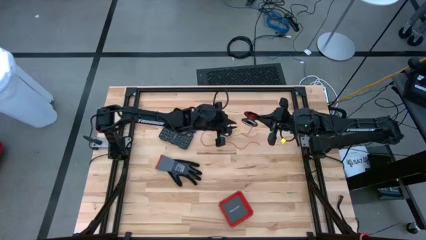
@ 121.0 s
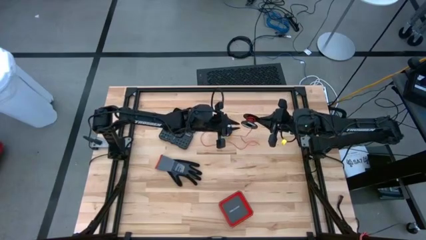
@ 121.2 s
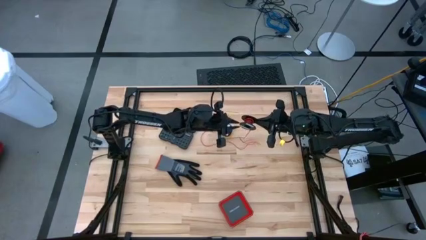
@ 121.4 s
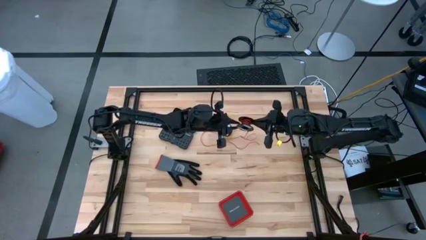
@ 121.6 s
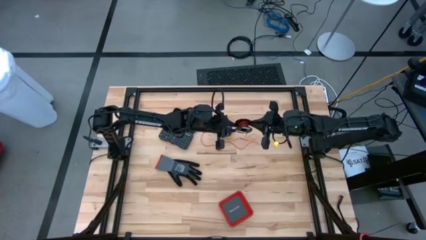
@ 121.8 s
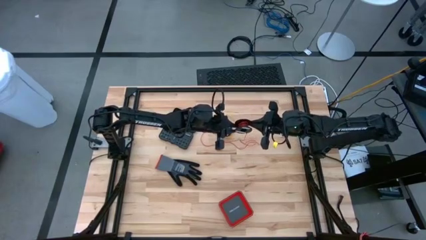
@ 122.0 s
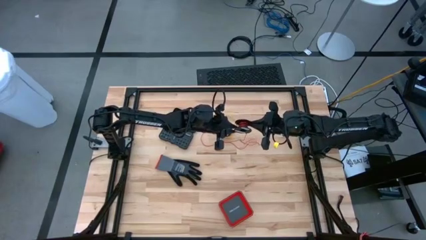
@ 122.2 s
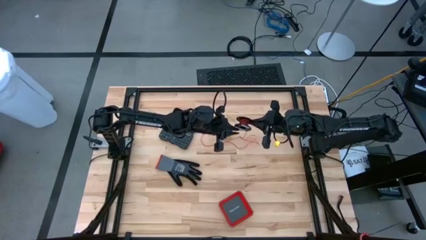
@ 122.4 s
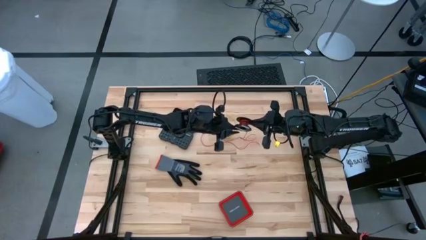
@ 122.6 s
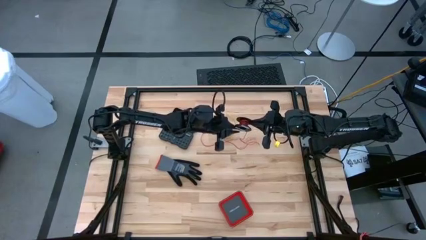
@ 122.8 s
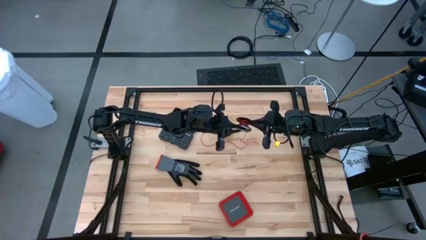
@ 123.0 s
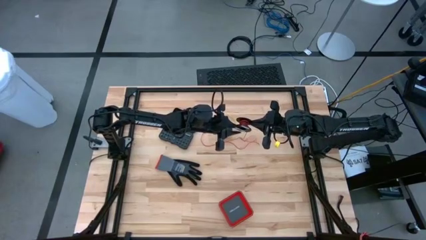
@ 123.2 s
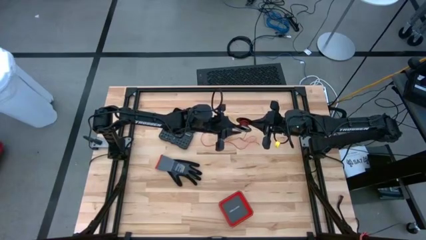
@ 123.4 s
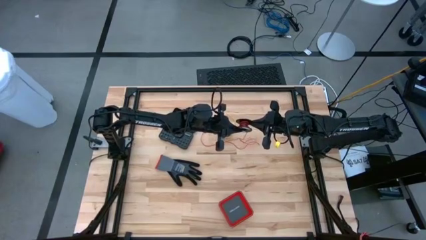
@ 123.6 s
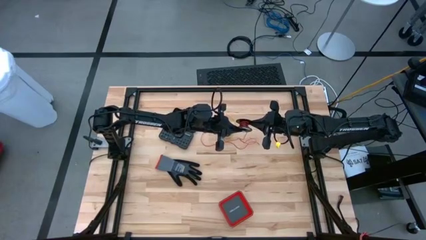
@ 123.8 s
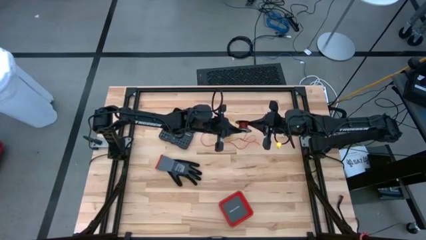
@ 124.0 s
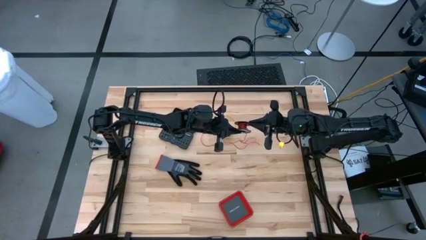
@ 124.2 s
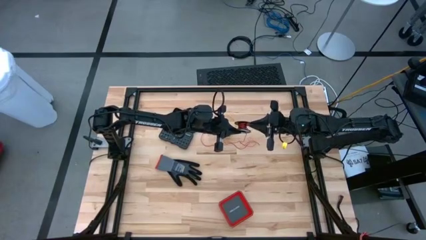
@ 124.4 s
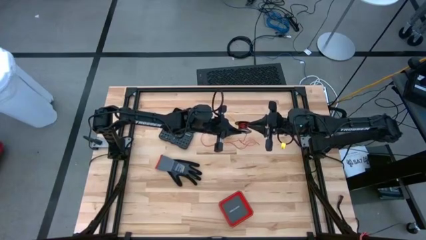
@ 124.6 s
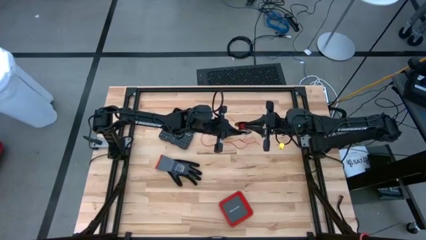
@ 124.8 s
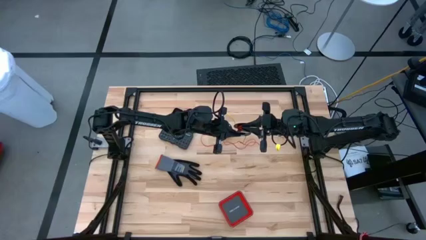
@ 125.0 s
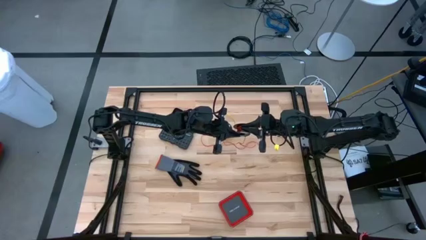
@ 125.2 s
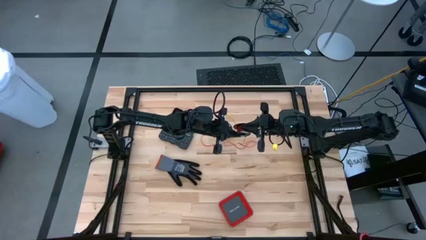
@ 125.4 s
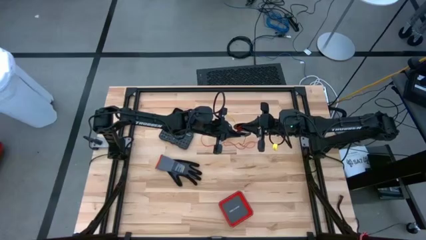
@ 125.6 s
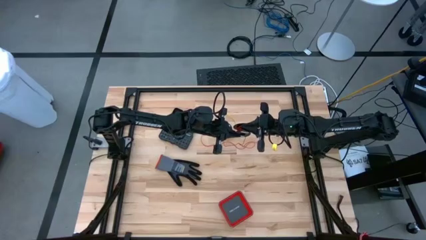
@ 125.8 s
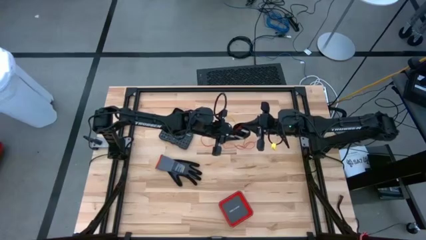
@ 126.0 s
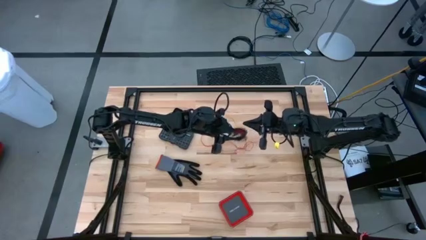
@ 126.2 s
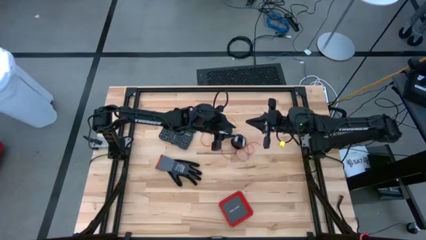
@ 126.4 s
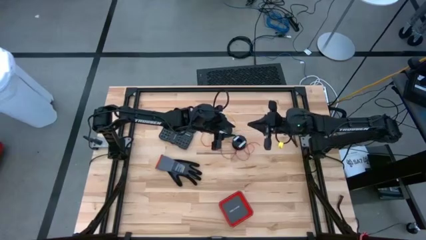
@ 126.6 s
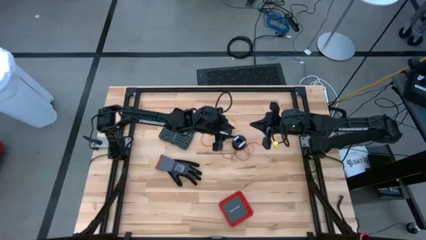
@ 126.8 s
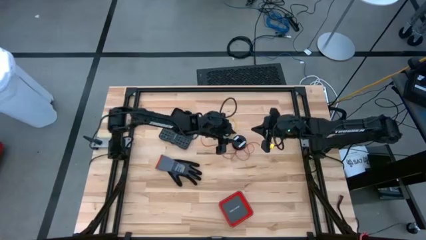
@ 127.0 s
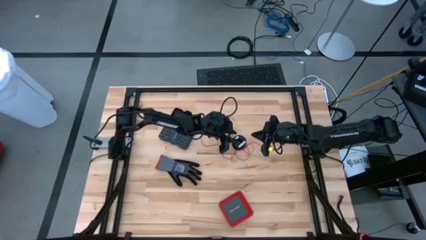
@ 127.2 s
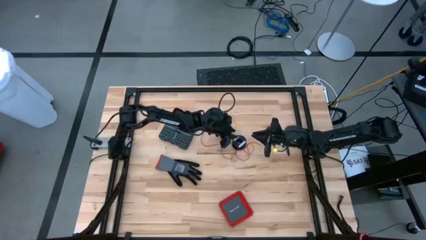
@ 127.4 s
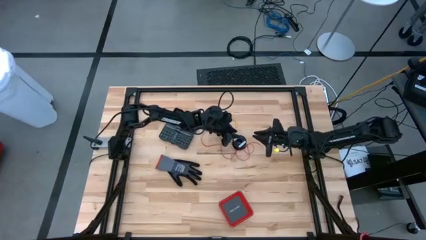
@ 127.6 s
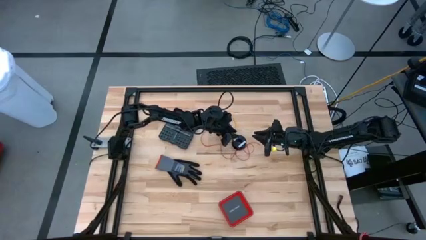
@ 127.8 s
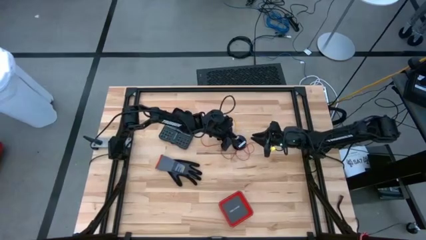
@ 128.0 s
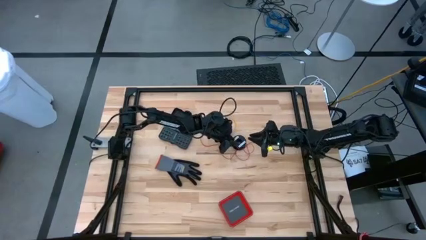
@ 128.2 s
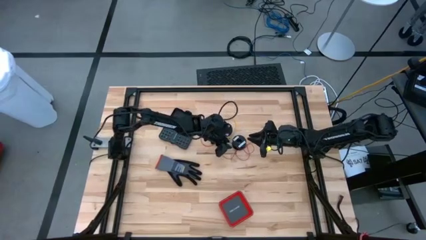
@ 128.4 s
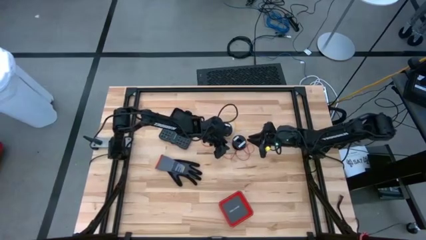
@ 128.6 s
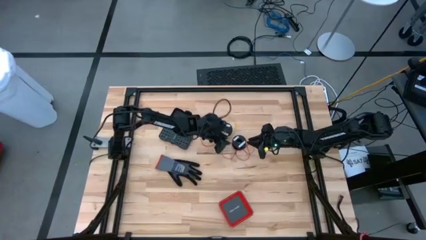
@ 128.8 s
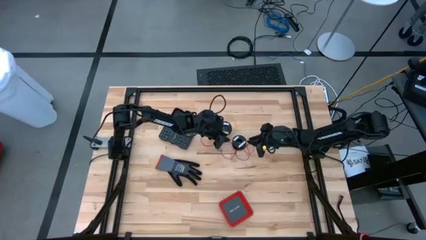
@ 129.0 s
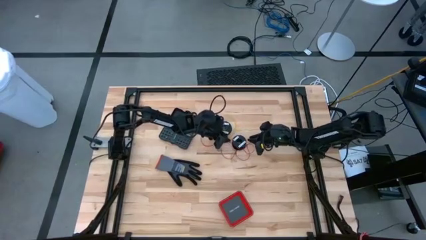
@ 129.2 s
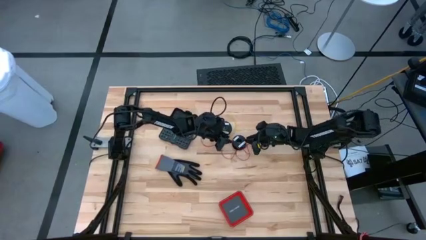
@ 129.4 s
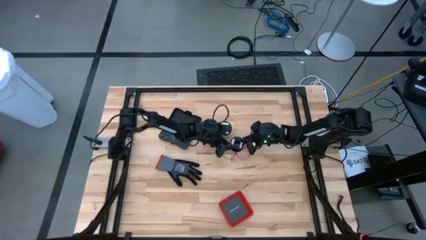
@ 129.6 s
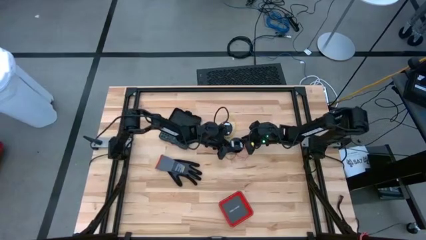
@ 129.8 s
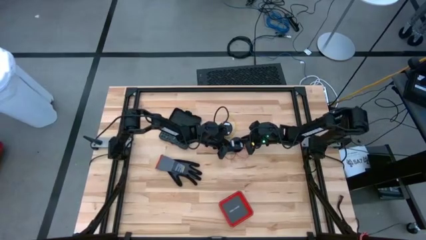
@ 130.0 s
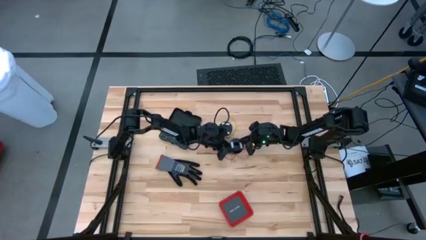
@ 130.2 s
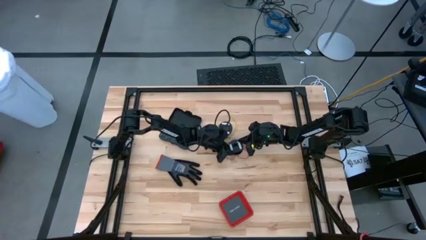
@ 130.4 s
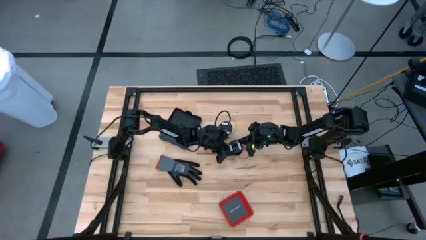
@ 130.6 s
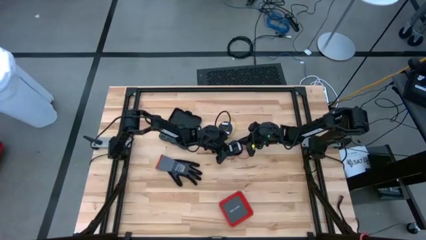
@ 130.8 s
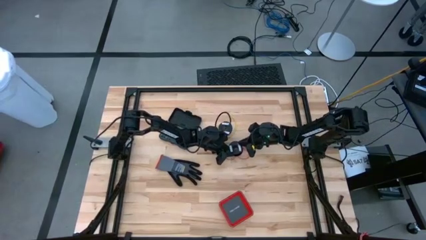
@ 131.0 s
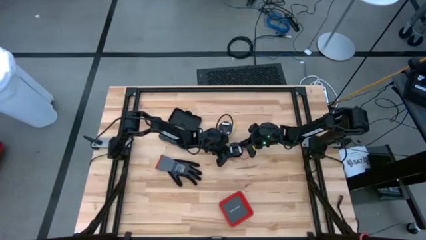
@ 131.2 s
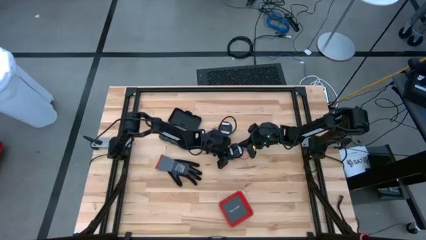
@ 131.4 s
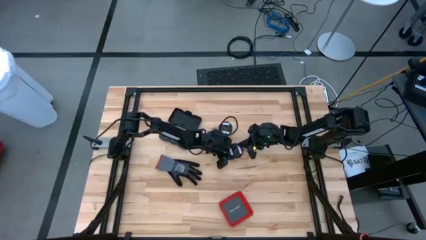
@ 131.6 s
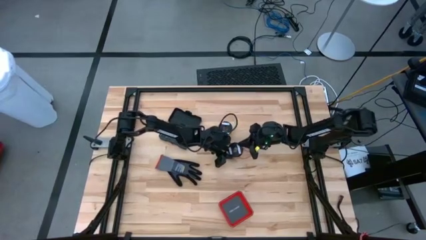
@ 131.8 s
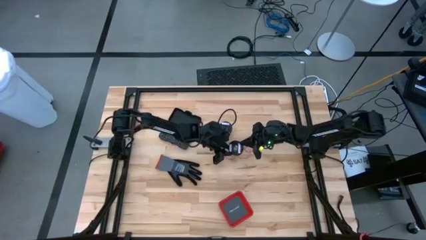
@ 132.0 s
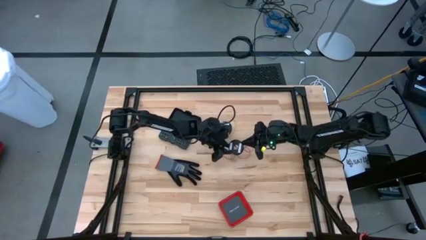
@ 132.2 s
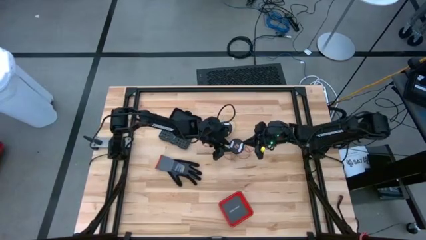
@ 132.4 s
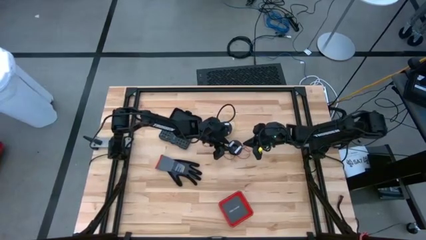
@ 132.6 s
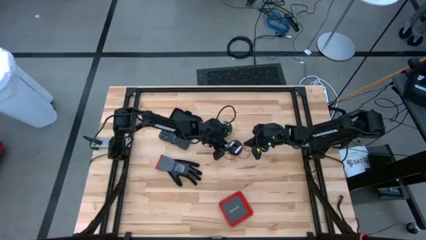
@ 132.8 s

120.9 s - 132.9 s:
Task: Coil cords
Coil the red wire onto the spool
